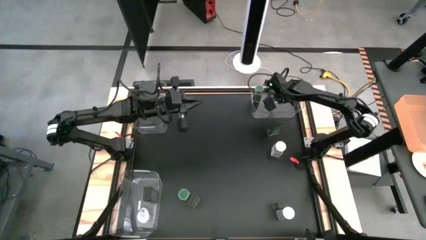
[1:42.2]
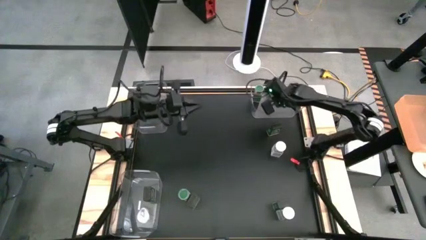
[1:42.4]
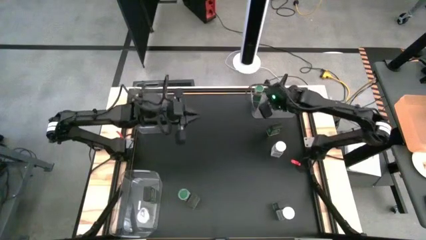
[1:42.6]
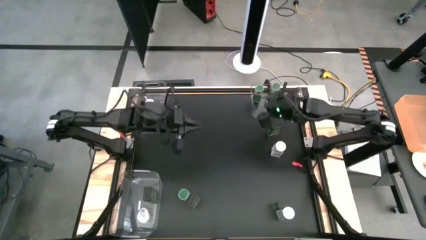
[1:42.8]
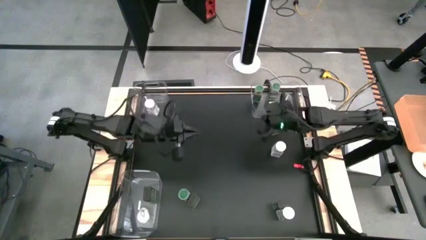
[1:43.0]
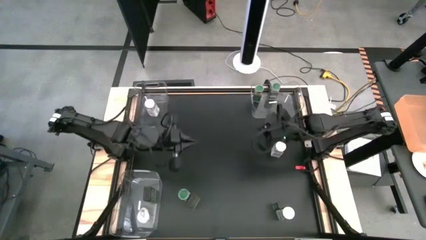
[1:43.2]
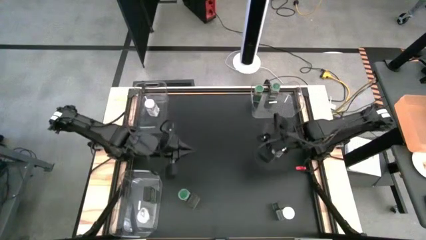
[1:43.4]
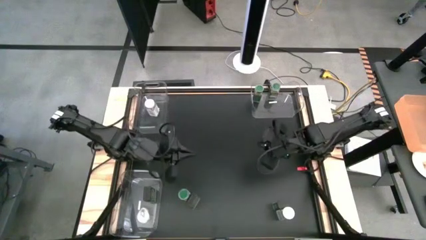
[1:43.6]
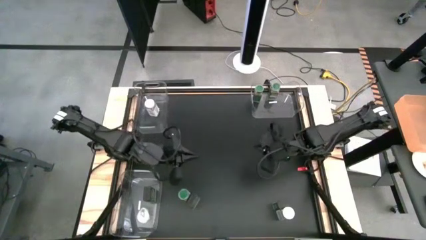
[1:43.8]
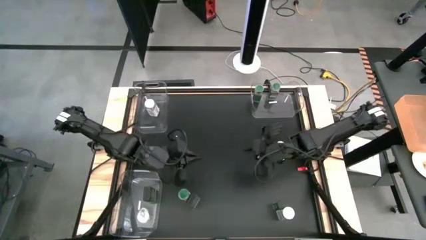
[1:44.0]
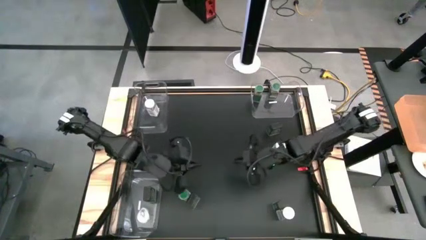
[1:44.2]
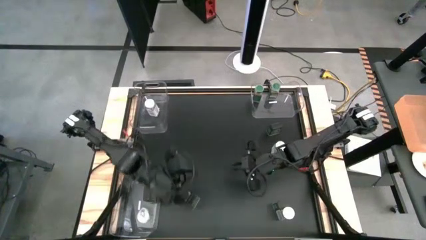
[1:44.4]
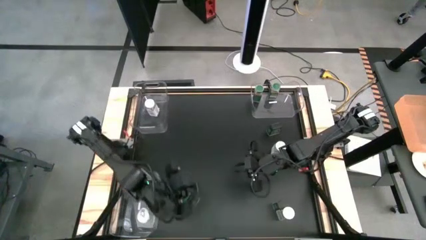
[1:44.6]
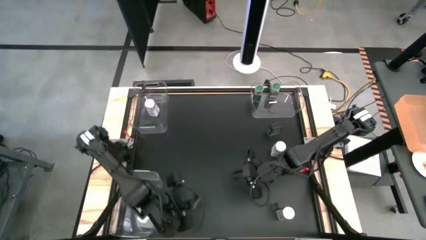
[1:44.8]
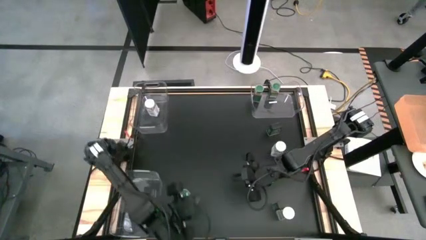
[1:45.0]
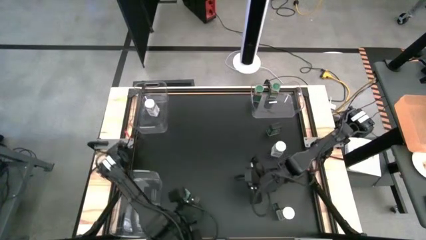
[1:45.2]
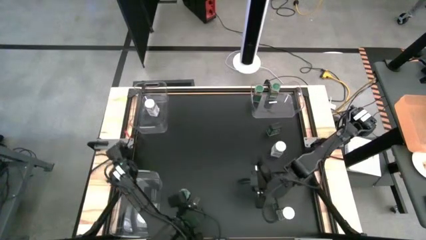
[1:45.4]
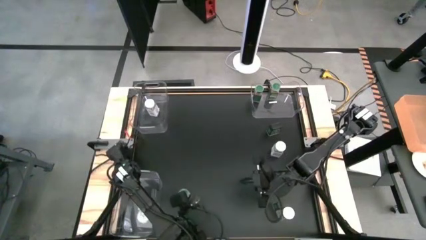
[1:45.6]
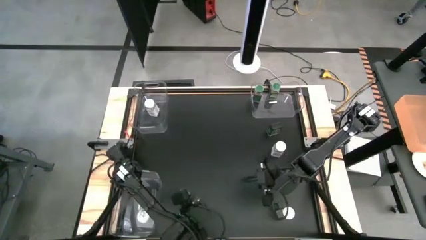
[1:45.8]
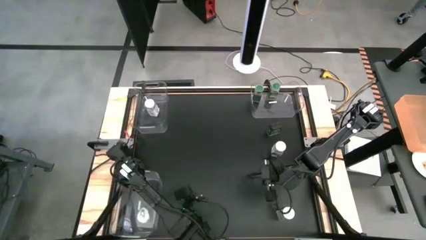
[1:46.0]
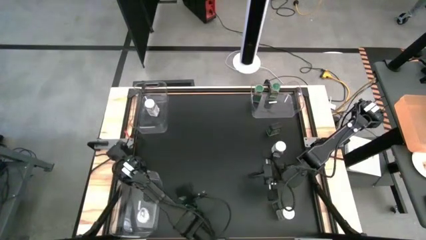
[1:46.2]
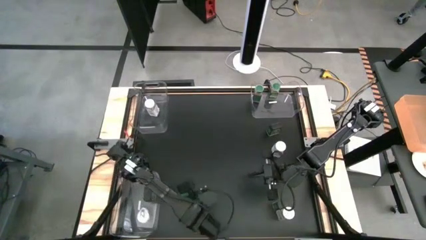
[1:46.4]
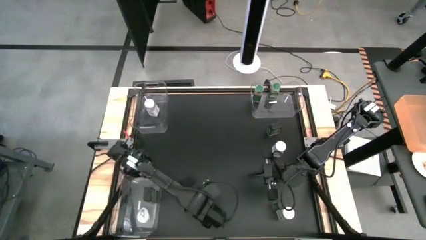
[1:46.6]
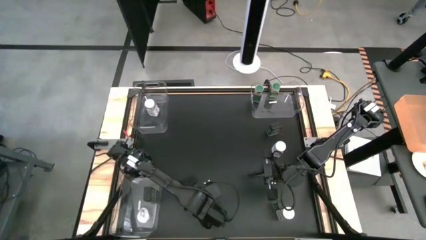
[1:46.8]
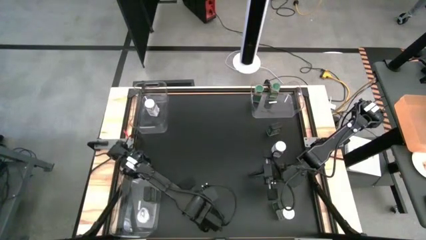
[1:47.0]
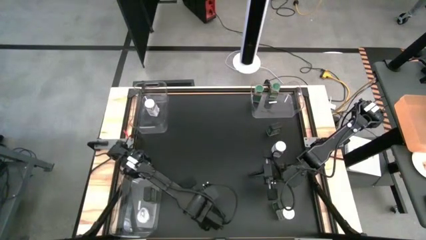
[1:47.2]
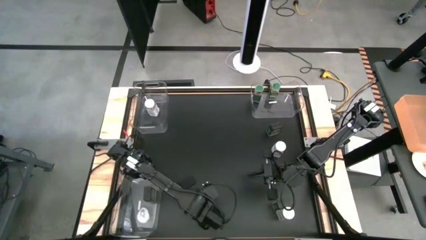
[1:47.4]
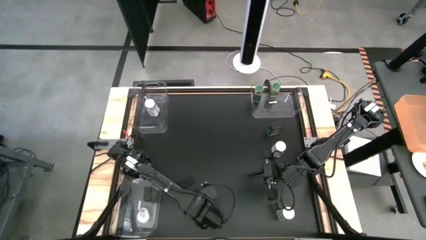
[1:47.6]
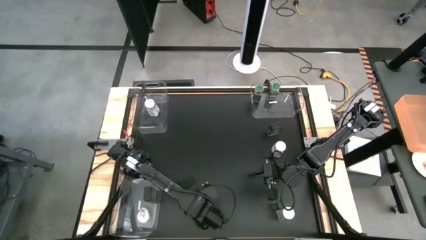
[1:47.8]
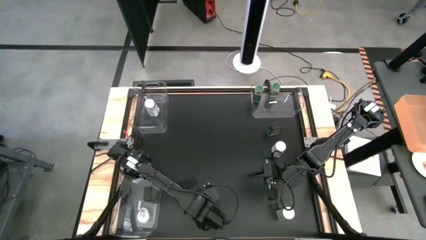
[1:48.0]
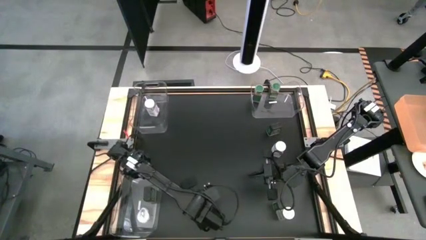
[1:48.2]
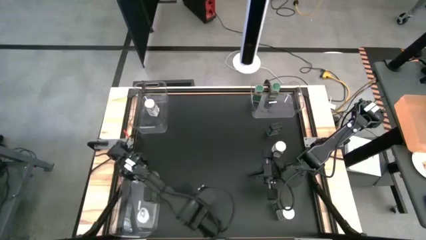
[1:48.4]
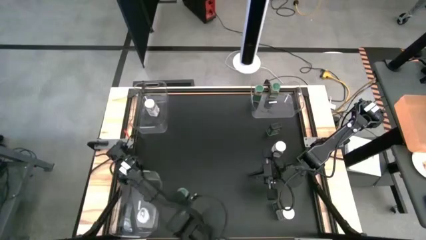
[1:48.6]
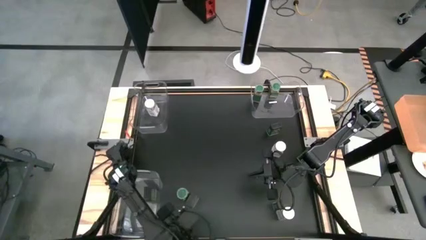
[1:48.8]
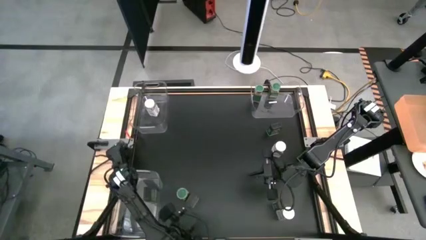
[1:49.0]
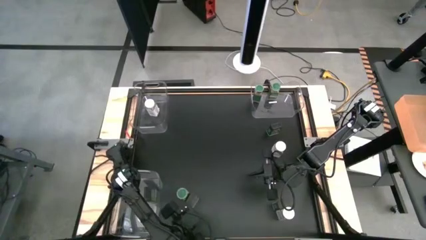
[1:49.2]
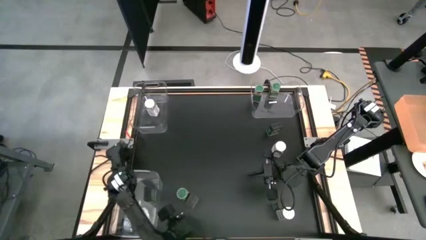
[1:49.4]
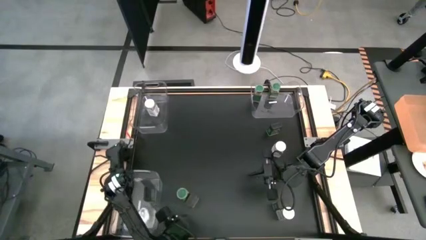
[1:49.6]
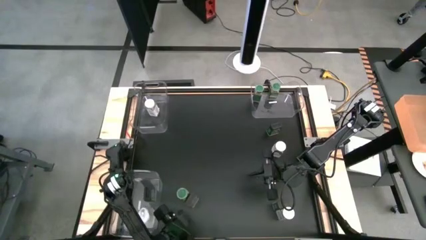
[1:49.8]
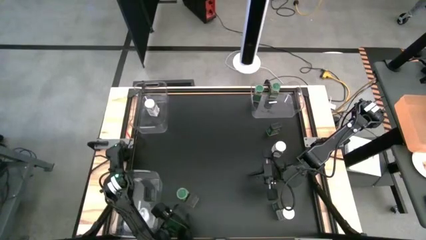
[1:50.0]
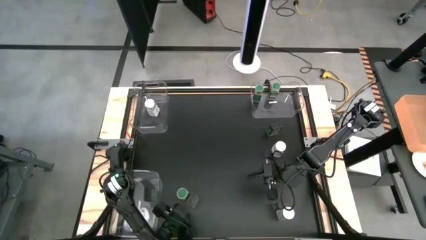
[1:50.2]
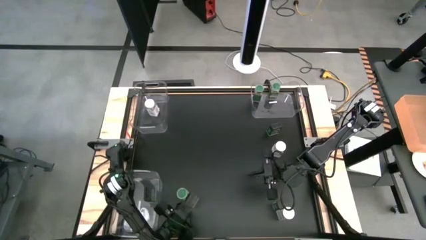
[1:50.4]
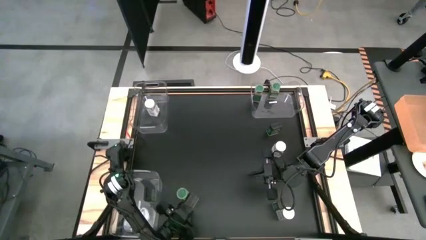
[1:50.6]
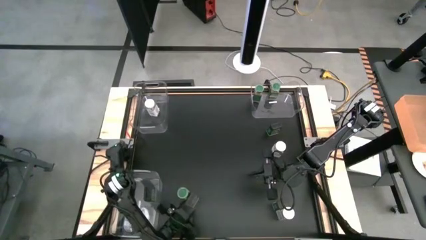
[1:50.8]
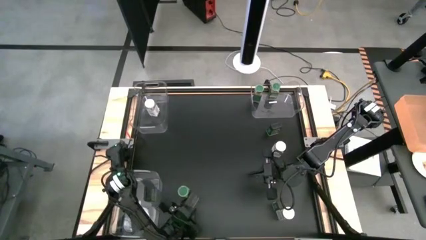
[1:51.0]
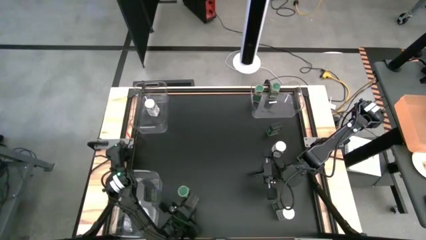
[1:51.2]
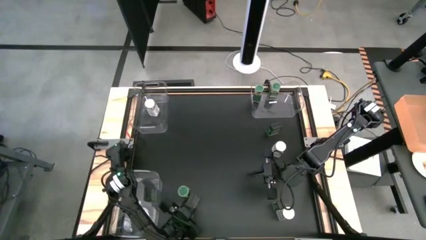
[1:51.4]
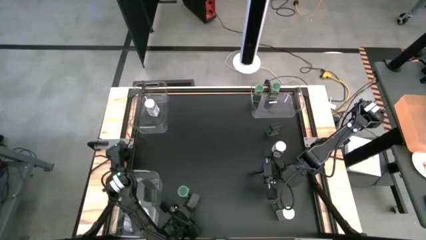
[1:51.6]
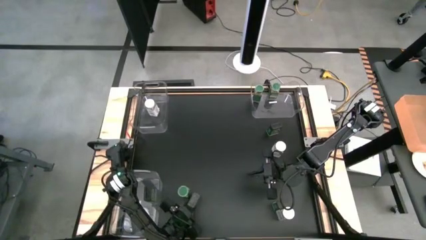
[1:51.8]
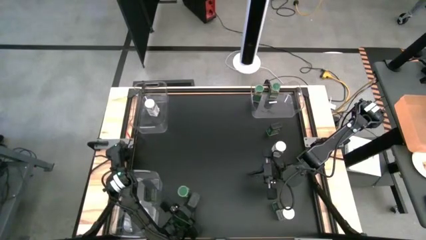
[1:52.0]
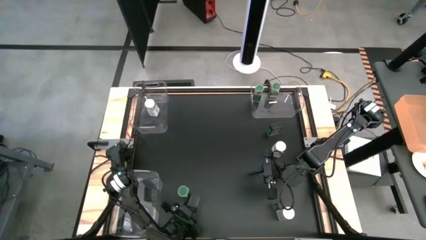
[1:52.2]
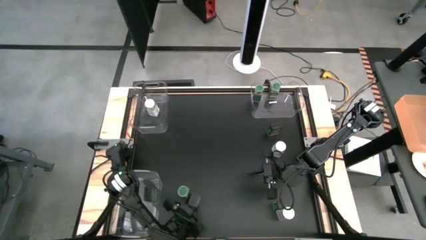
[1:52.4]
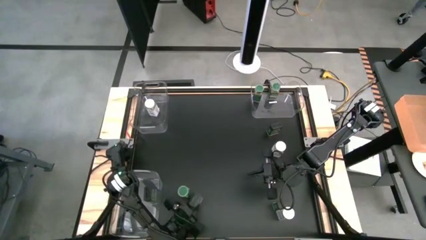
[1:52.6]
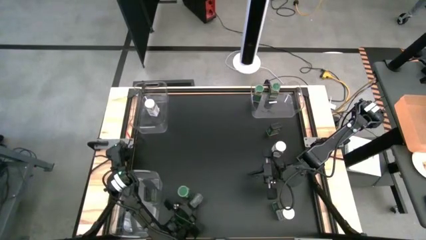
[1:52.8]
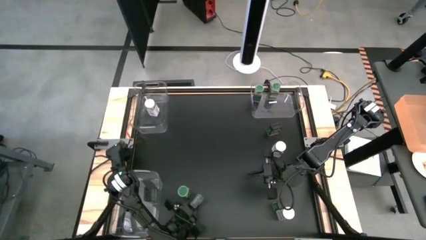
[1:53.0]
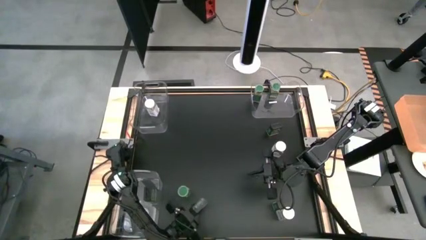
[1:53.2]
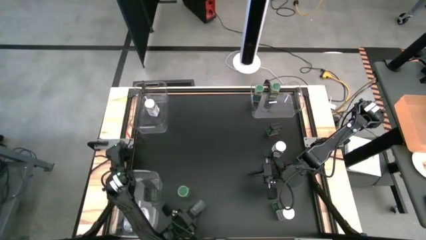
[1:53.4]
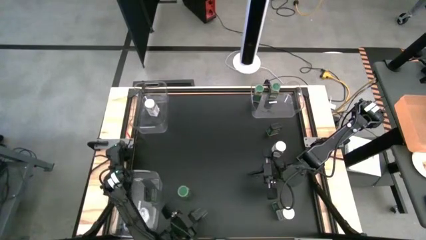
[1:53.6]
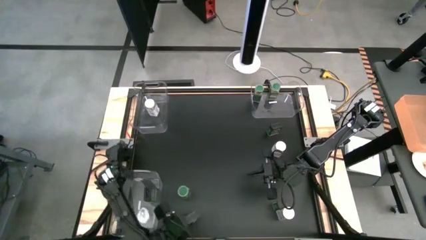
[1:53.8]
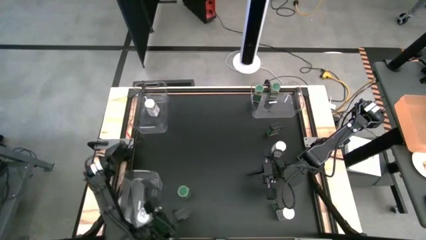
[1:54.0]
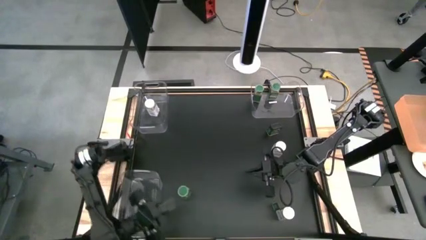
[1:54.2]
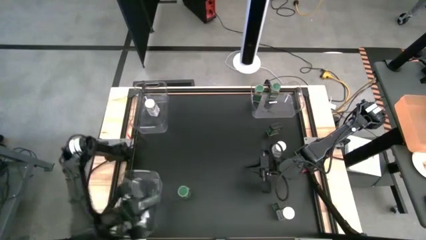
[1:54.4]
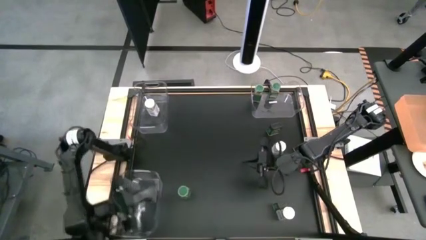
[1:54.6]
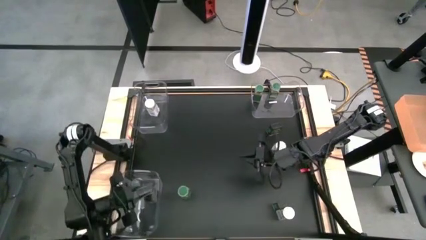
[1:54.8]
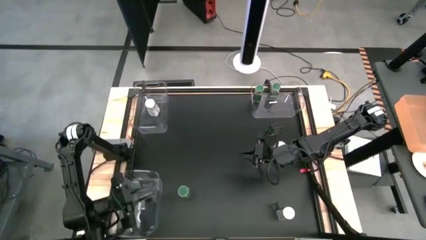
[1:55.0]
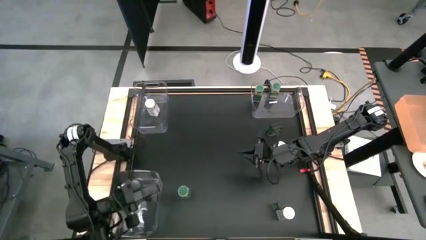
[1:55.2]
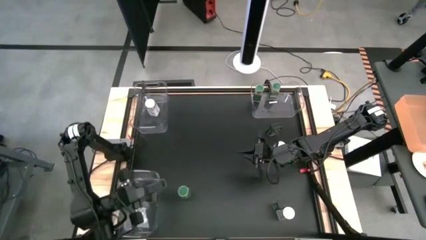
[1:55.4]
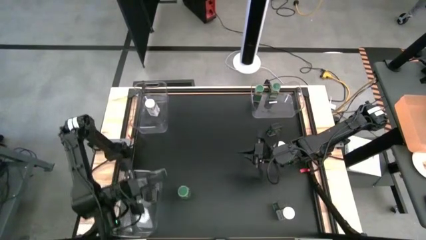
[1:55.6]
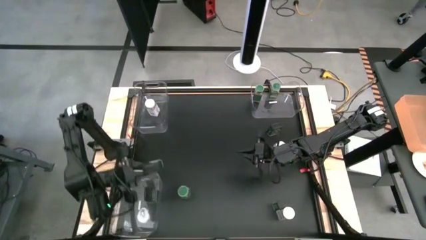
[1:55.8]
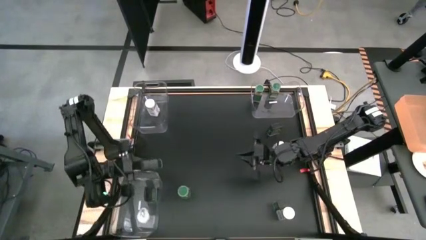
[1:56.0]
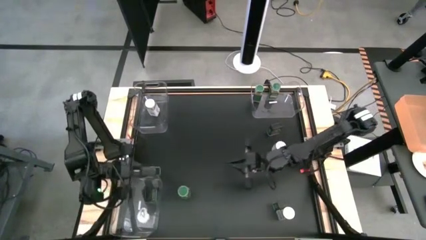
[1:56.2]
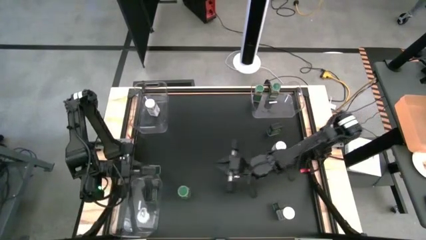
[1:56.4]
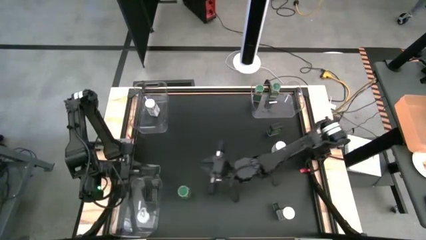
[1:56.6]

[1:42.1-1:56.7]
Task: Sort spices by type
Put the bottom left black seasoning can into the bottom transparent bin

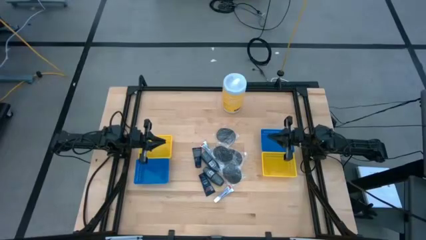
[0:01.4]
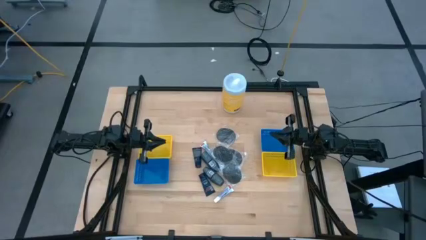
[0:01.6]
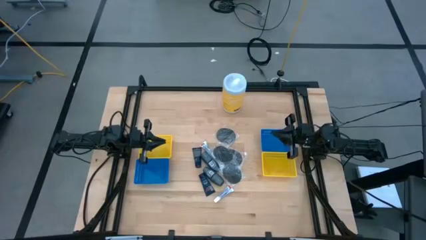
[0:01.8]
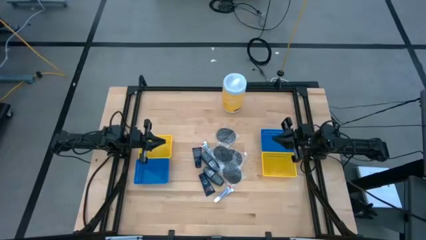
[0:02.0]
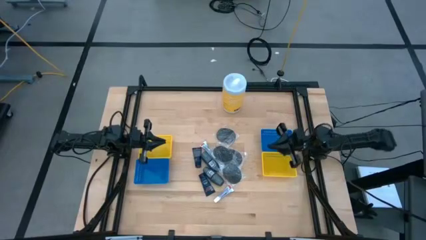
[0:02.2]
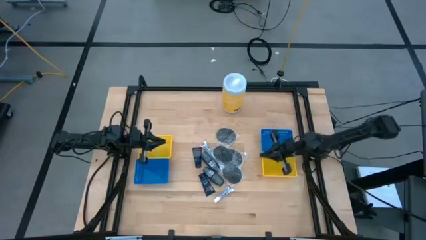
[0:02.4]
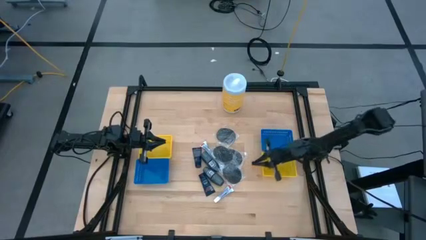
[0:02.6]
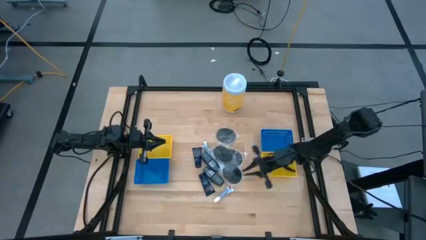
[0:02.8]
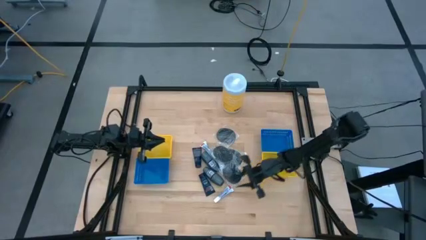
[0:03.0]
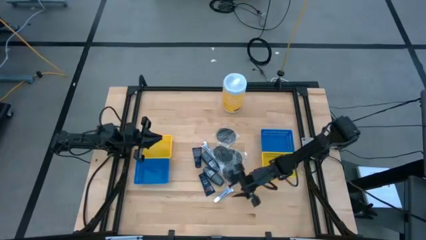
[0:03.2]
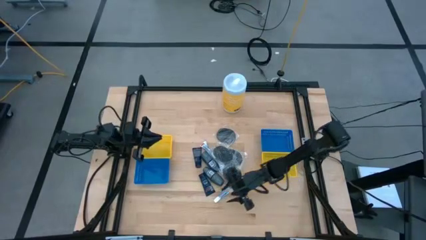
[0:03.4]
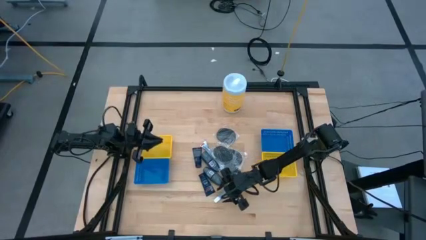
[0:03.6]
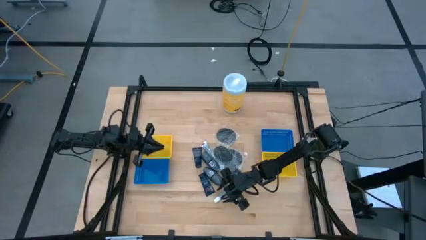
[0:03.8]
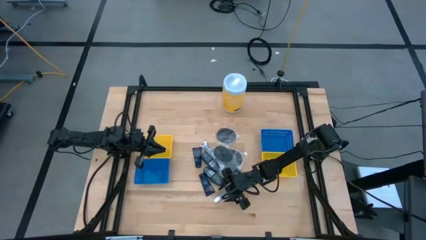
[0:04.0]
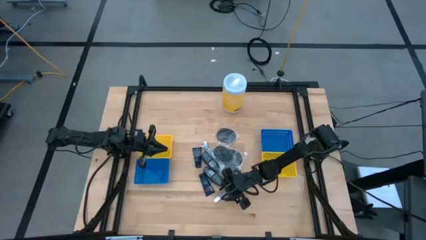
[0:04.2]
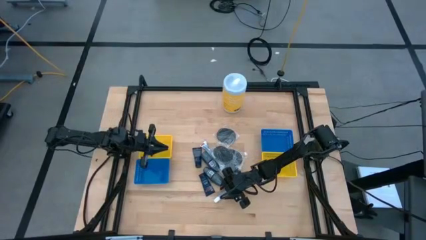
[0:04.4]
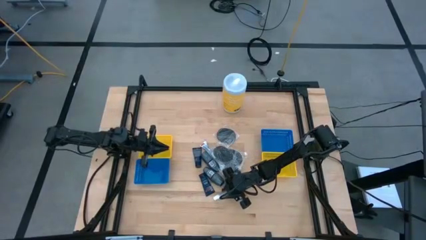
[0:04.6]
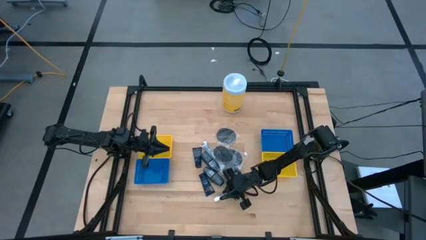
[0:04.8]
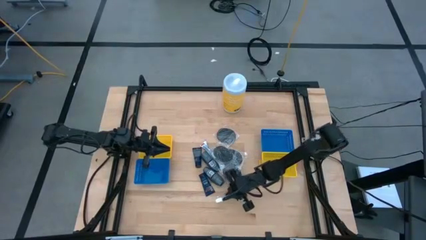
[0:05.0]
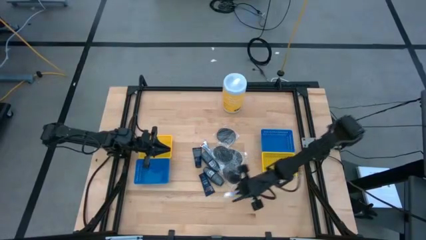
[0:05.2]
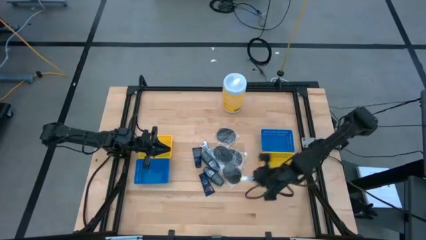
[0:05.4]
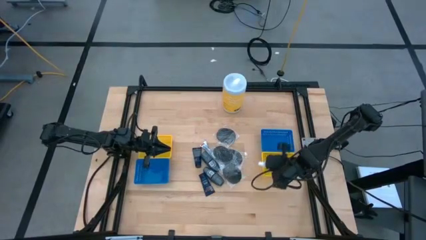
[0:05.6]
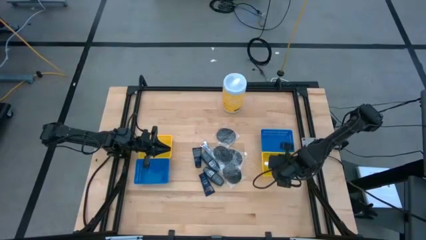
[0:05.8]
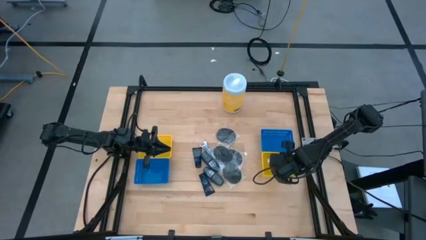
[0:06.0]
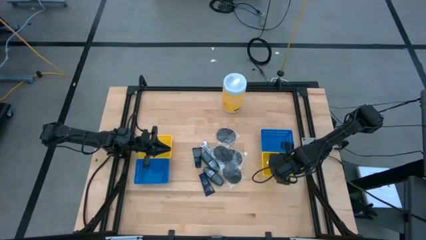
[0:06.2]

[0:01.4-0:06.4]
Task: Pick & Place Travel size toiletries
Put the bottom white toothpaste into the right yellow bin
